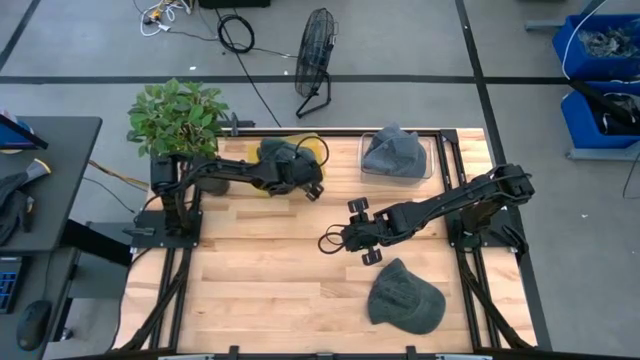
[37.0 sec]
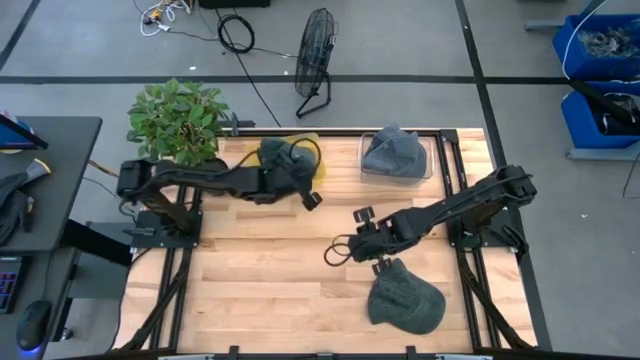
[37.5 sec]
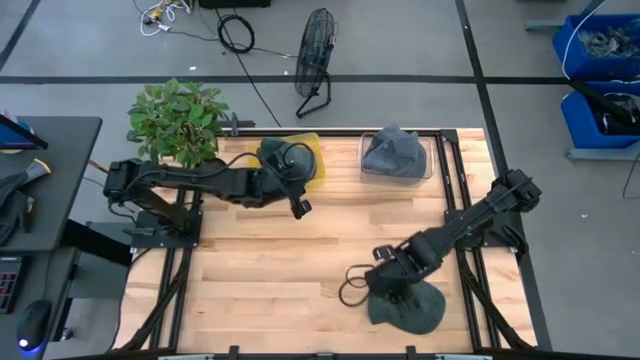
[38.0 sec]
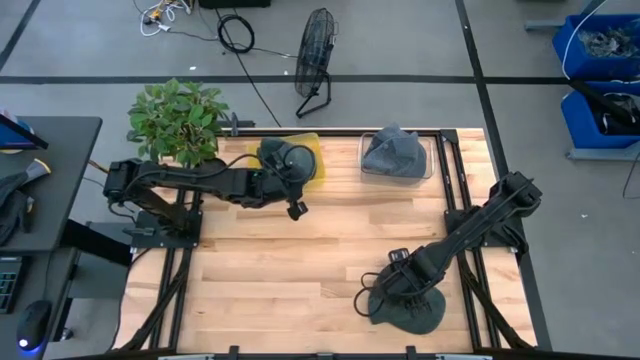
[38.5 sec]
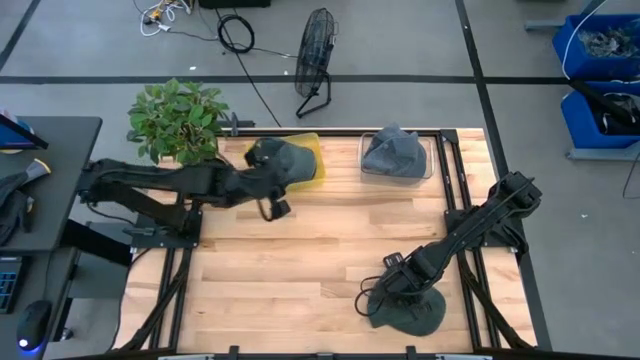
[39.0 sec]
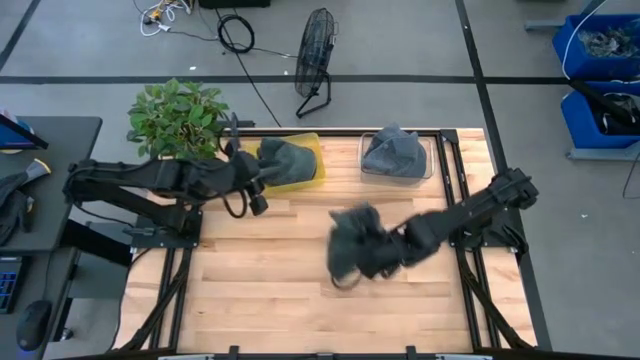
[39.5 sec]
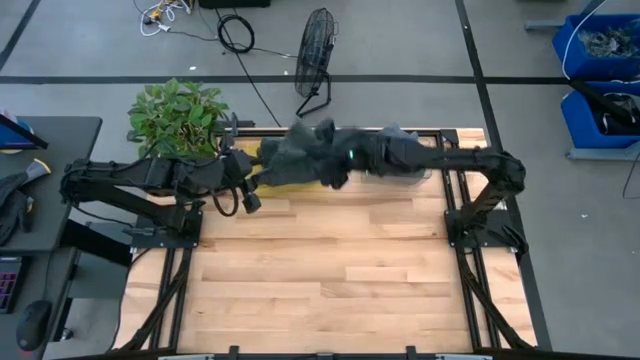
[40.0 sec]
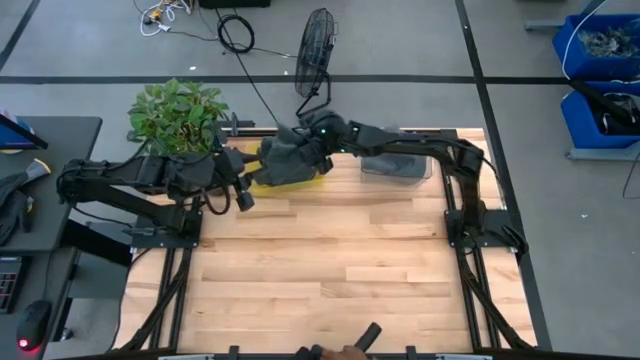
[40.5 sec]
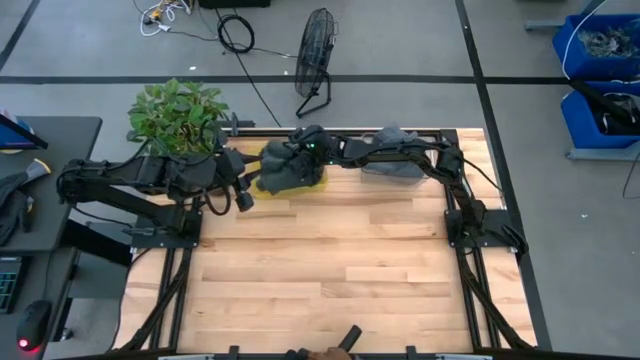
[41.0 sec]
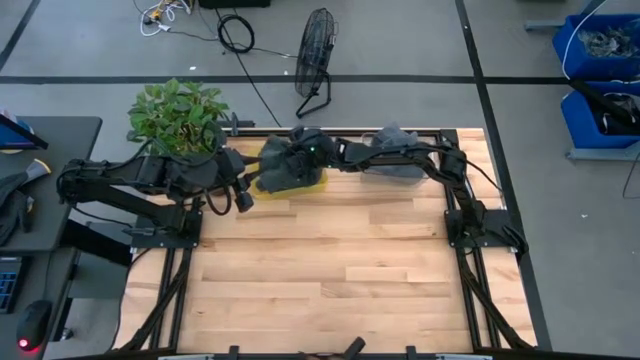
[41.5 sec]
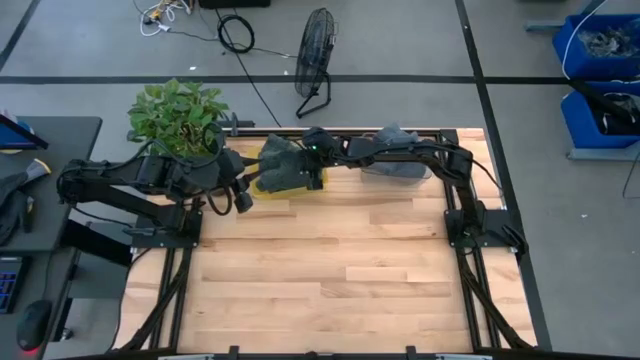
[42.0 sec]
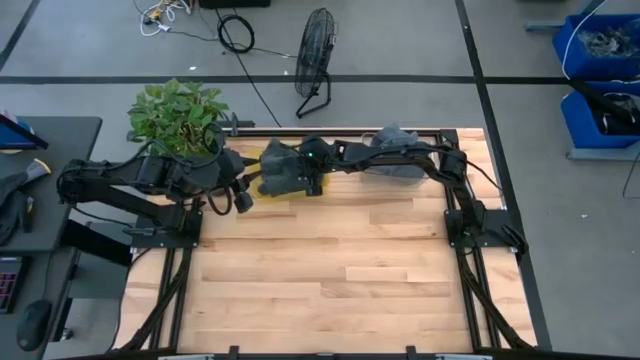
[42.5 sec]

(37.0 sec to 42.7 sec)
Task: Pick & Place hat
Put the black cap into the yellow bin

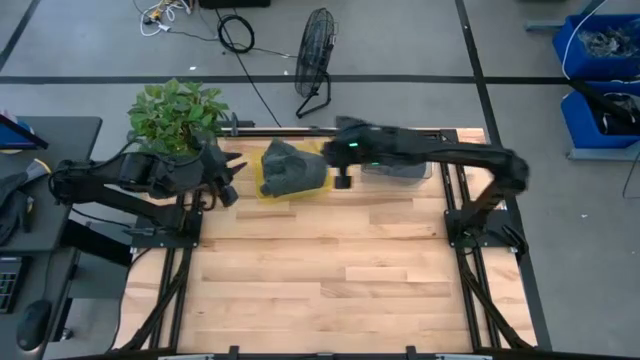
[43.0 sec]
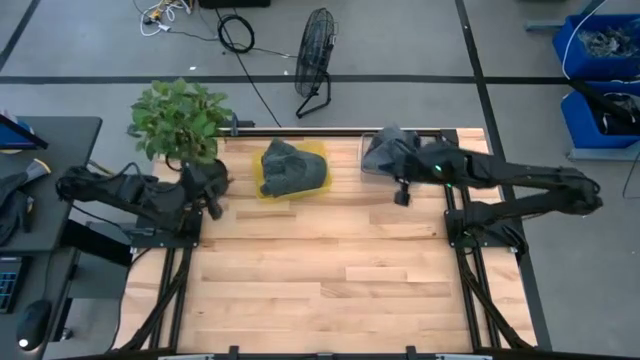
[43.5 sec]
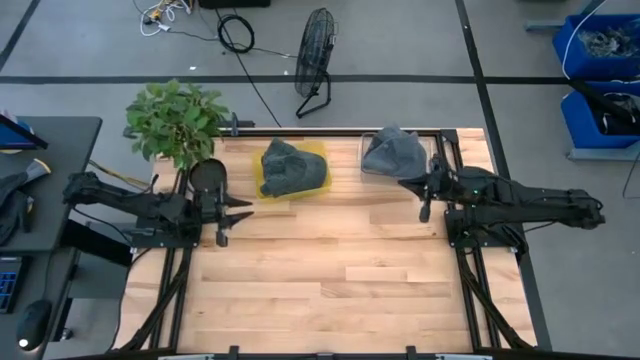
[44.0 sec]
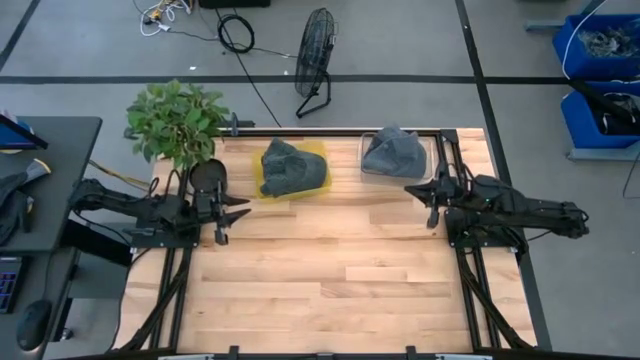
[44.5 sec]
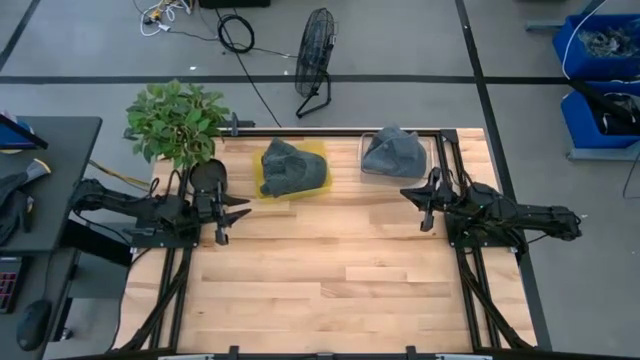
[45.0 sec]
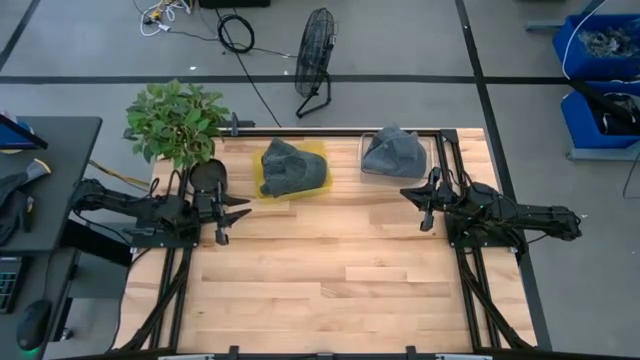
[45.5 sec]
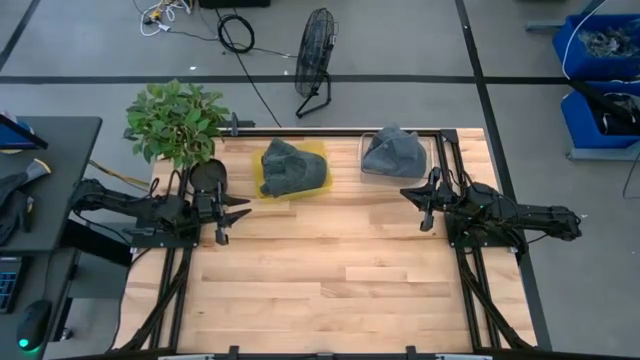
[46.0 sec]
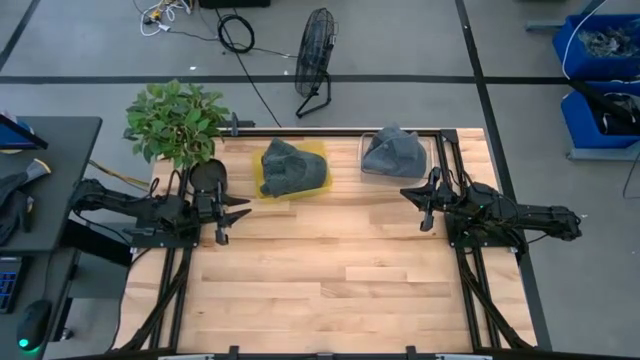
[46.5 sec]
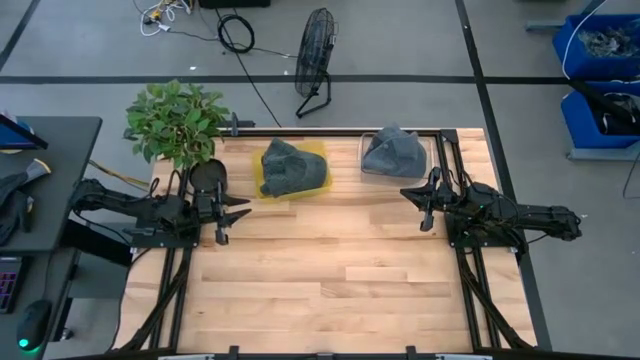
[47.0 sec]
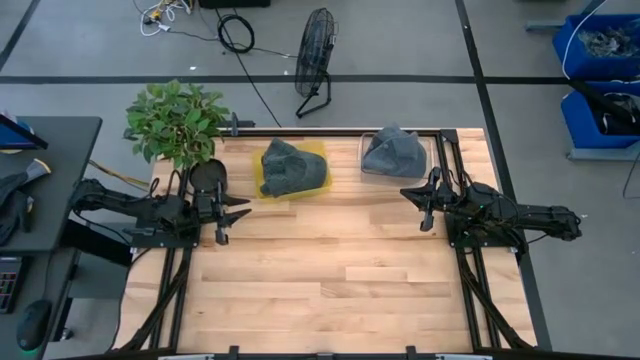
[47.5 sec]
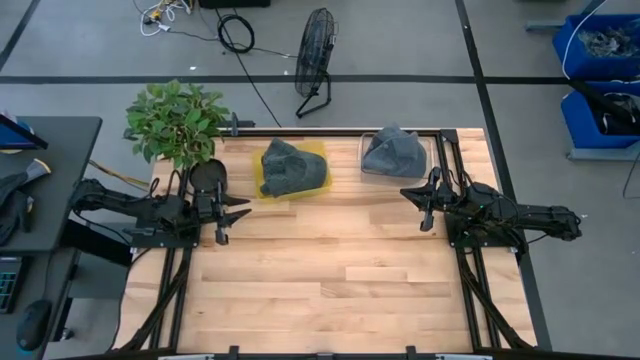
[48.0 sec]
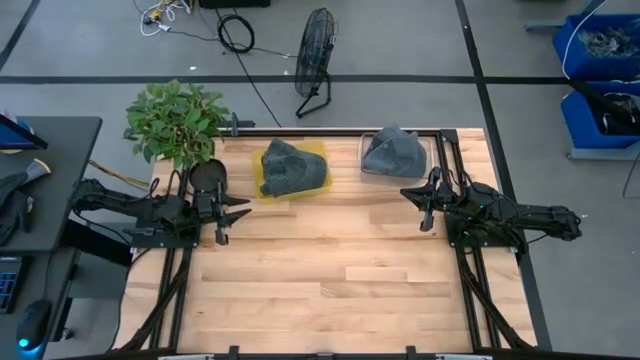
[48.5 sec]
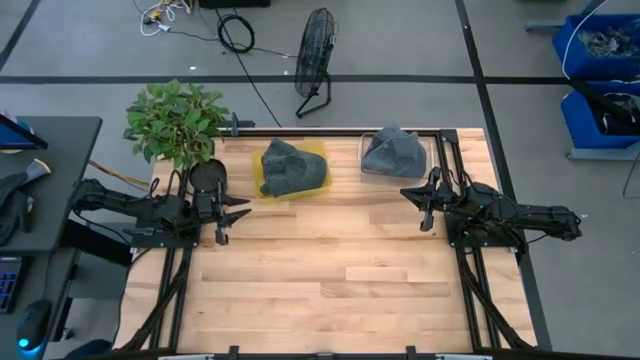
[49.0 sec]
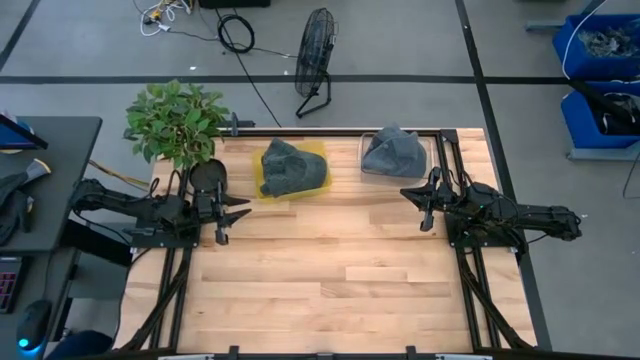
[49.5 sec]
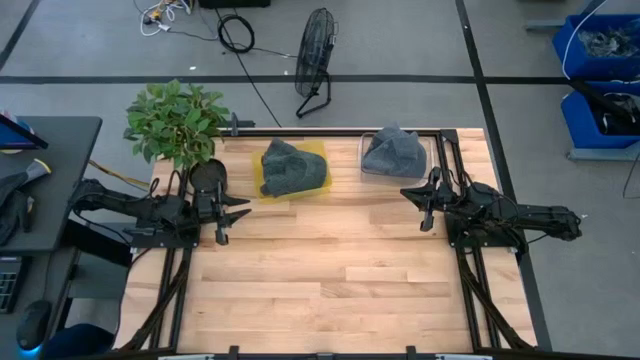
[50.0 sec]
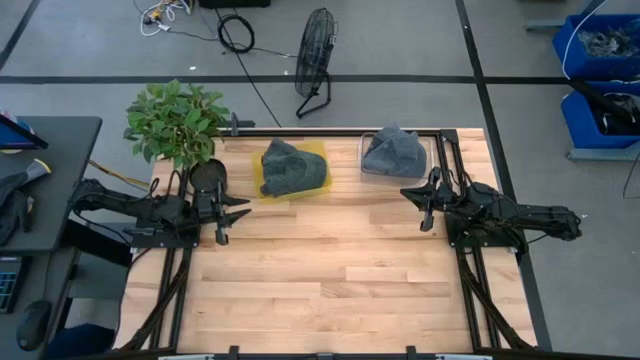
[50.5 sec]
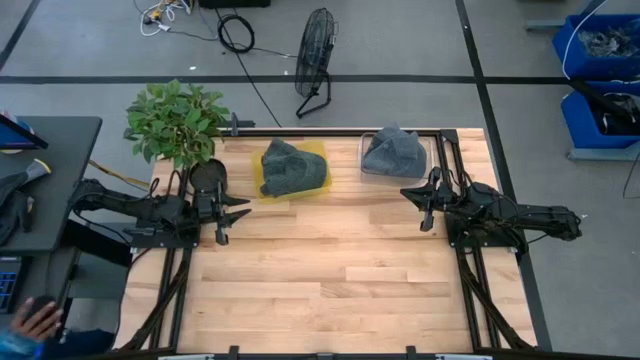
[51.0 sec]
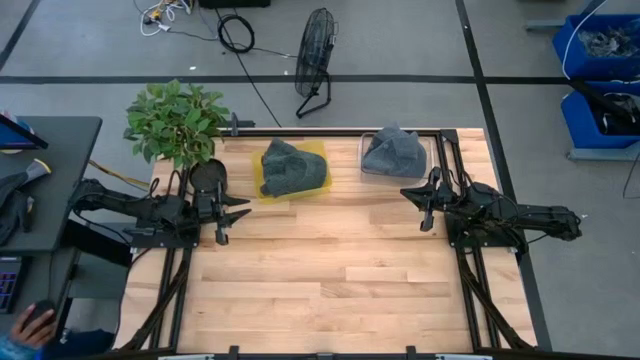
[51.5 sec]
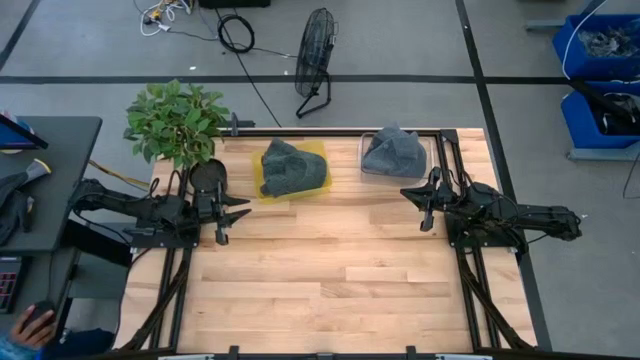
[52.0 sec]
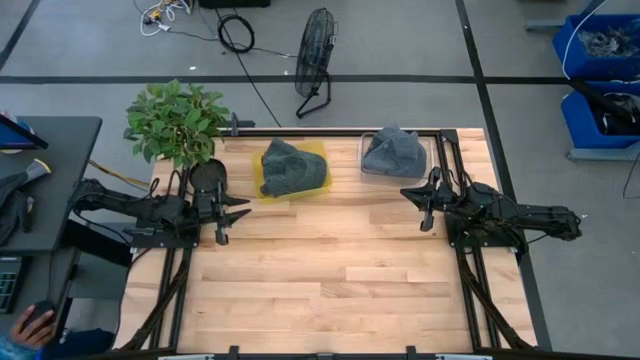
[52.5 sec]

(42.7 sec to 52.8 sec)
Return to Home Position
